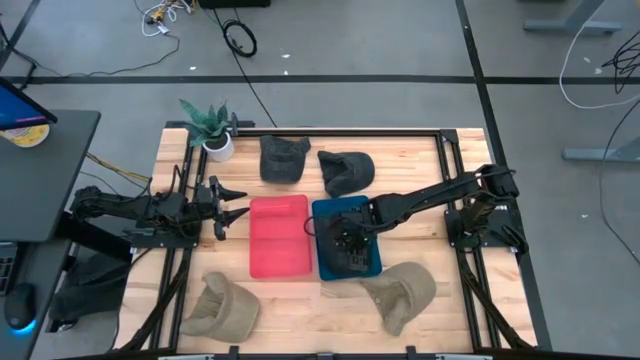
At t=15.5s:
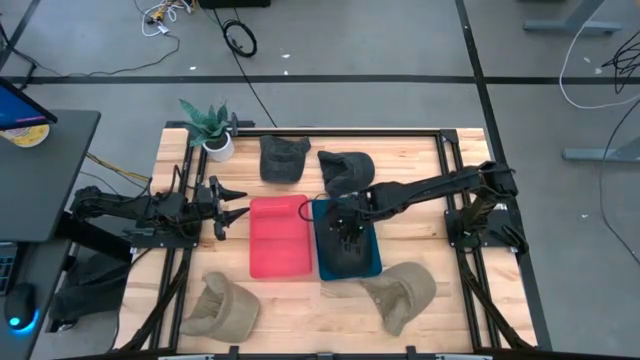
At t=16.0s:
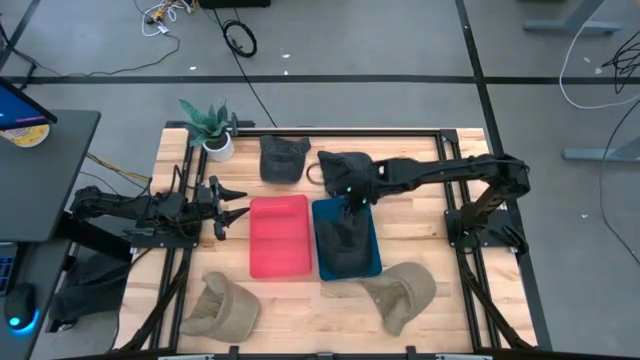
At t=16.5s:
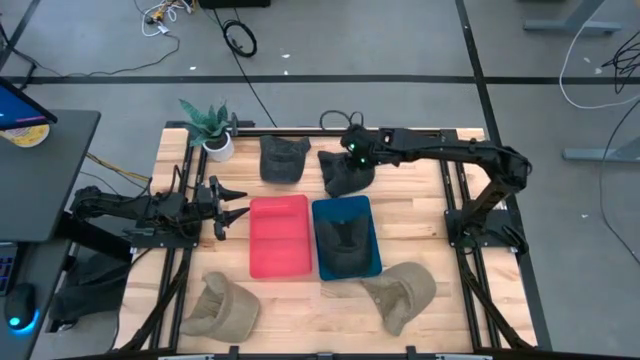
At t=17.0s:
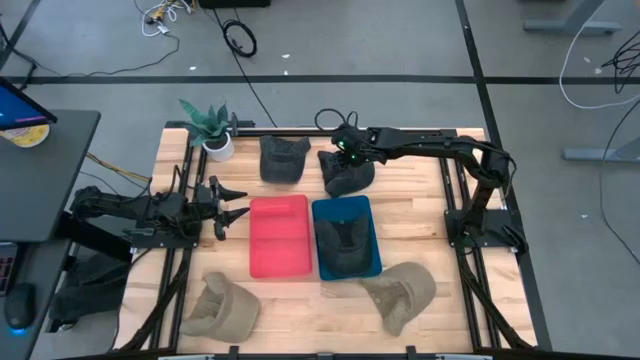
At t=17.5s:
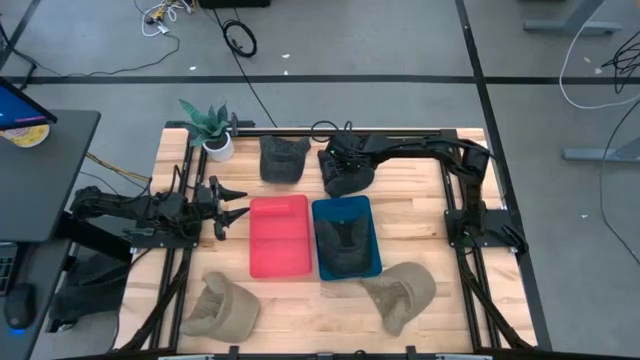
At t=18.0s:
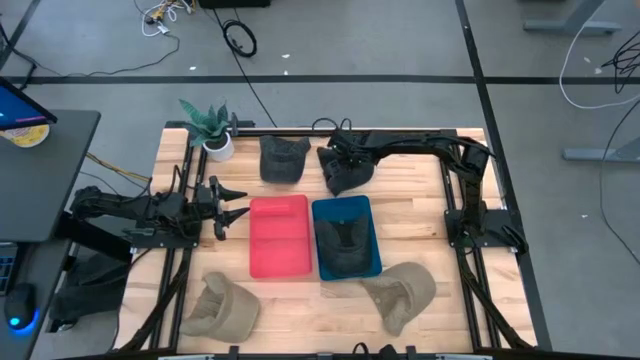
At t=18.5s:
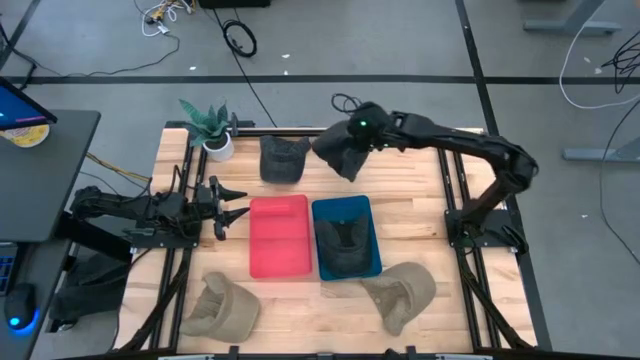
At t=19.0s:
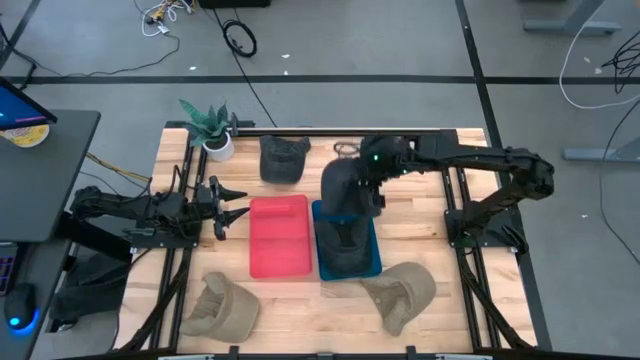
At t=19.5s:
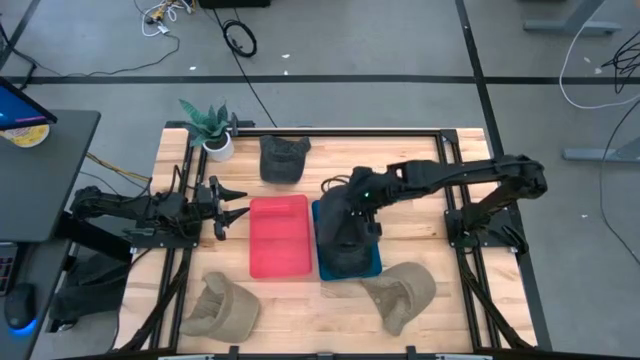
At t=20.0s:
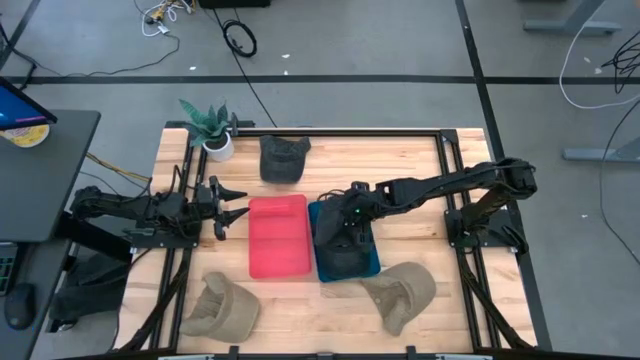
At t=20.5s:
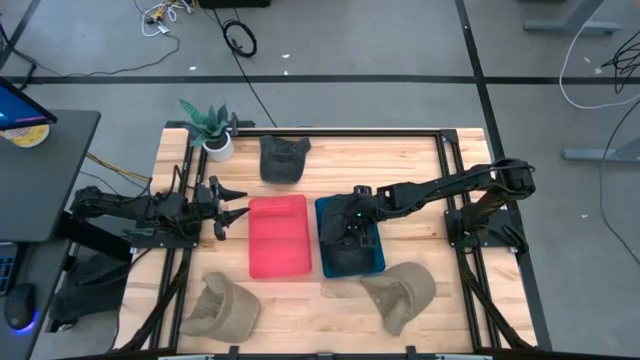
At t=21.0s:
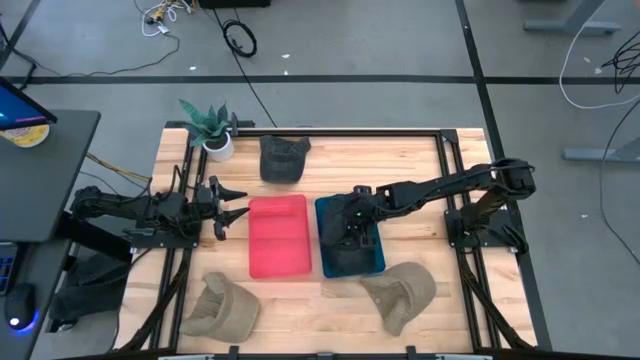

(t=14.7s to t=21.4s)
Task: Pick & Place hat
Put the black cap into the blue bin

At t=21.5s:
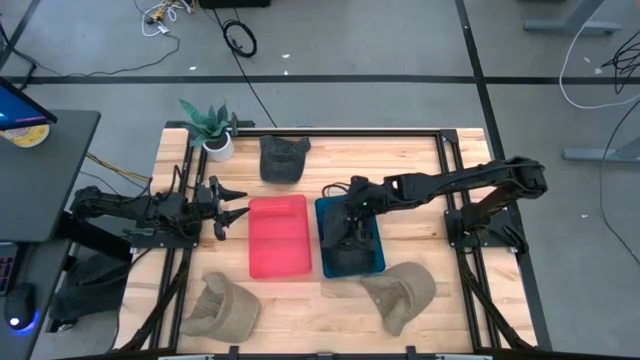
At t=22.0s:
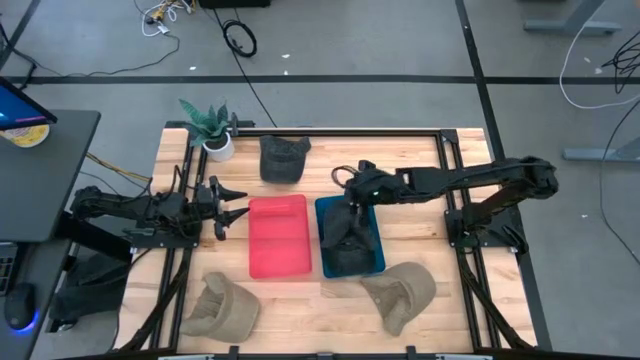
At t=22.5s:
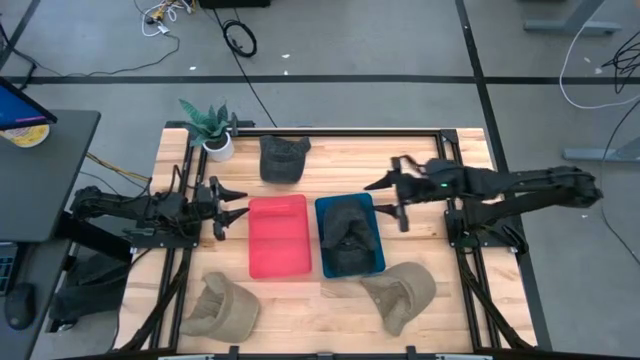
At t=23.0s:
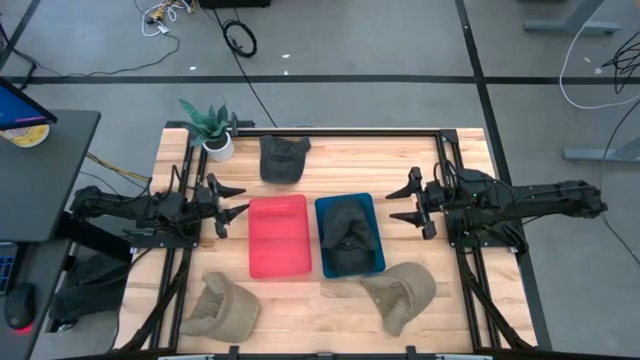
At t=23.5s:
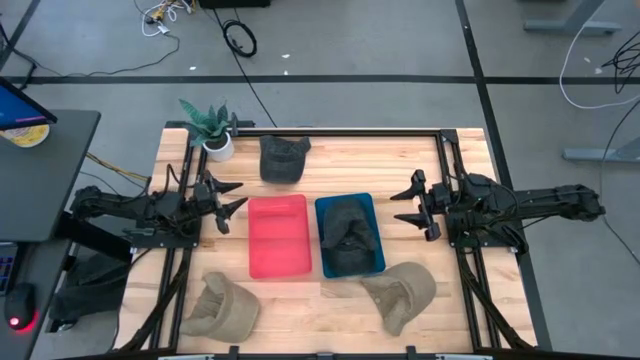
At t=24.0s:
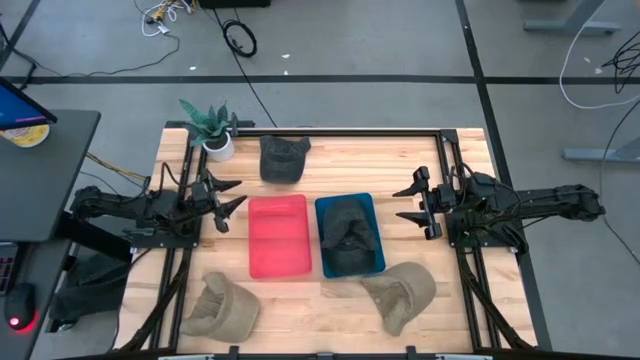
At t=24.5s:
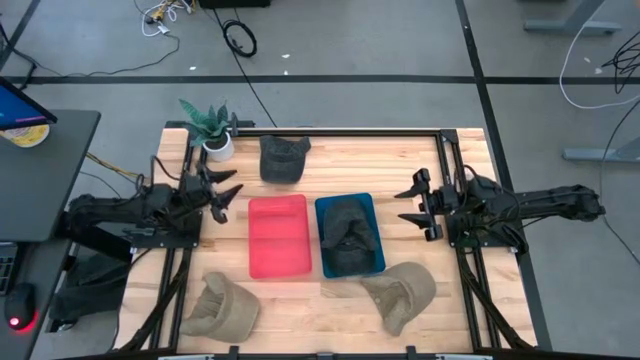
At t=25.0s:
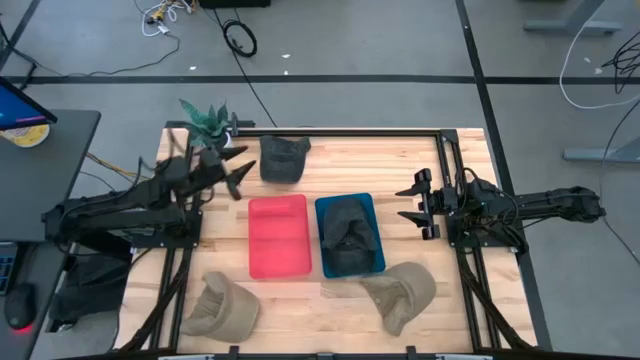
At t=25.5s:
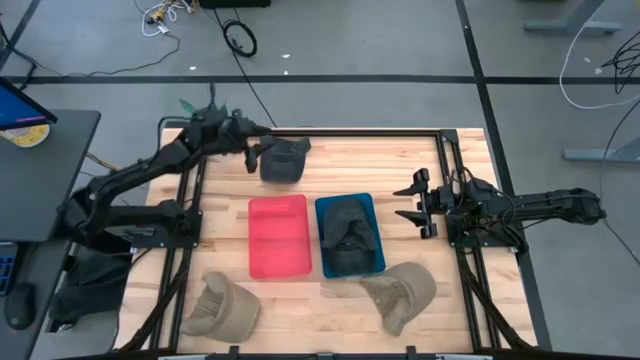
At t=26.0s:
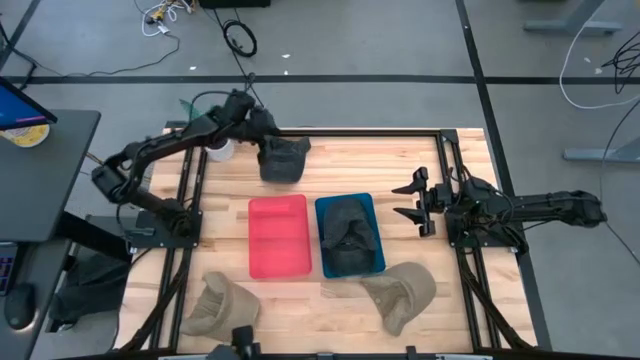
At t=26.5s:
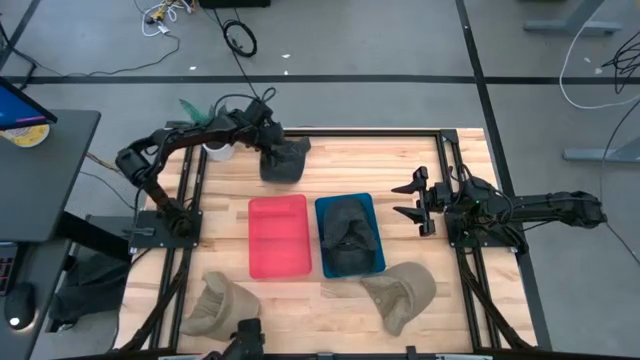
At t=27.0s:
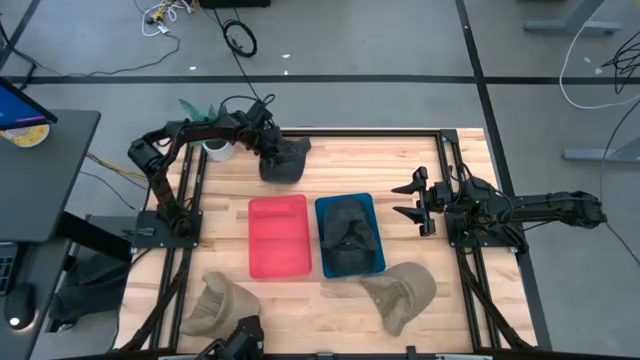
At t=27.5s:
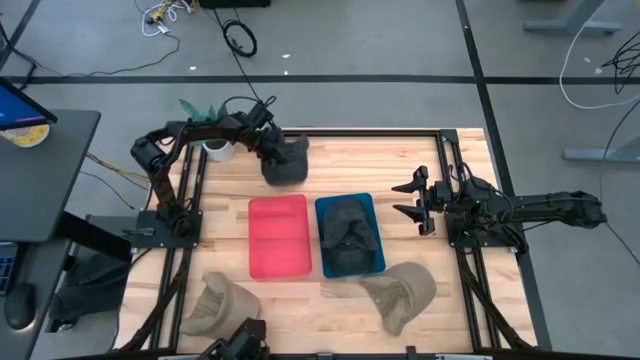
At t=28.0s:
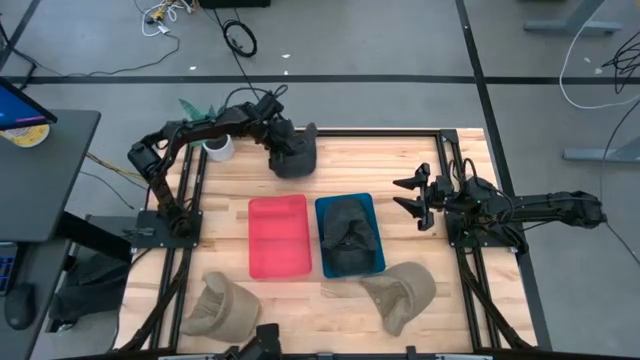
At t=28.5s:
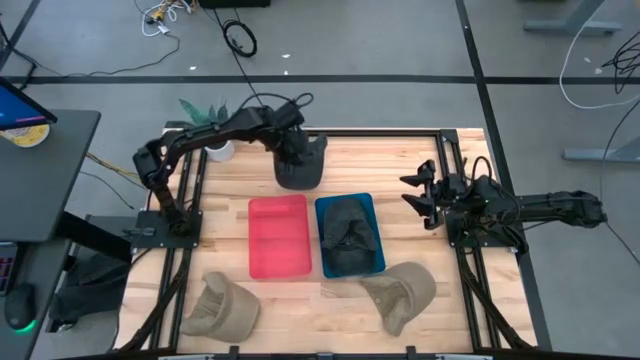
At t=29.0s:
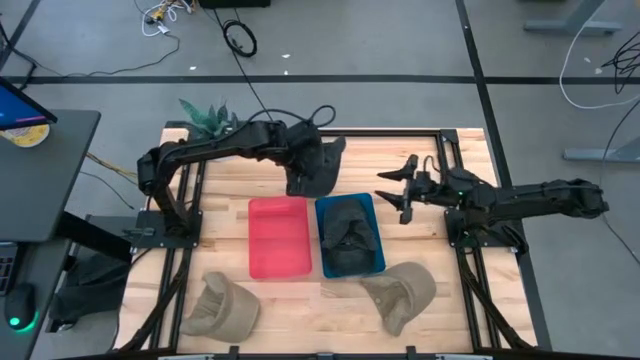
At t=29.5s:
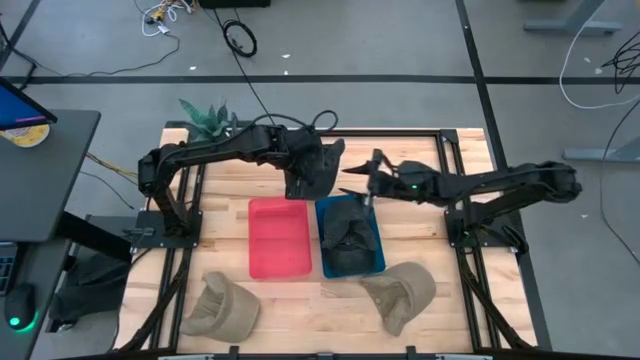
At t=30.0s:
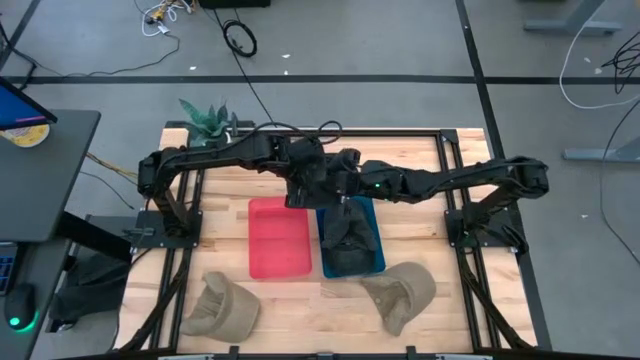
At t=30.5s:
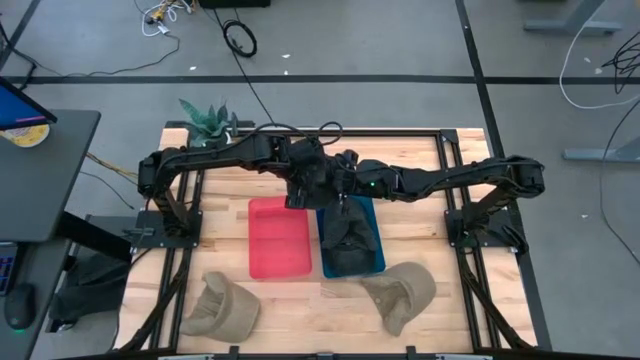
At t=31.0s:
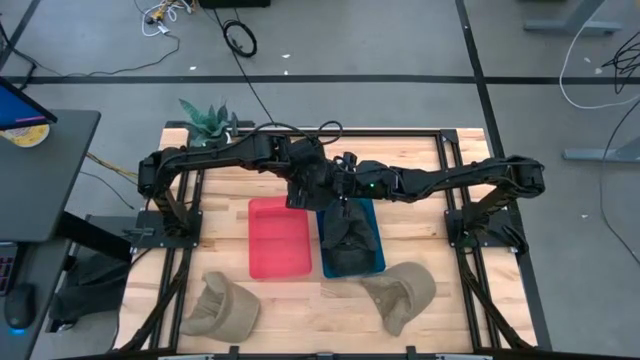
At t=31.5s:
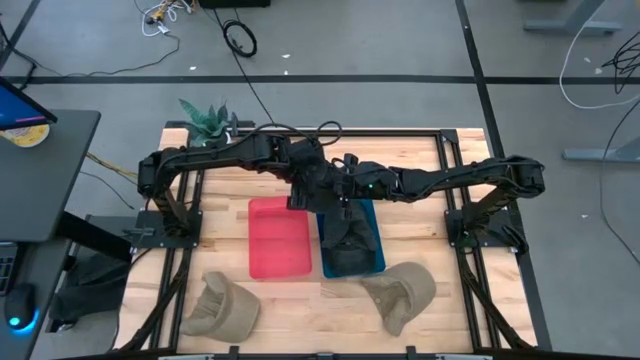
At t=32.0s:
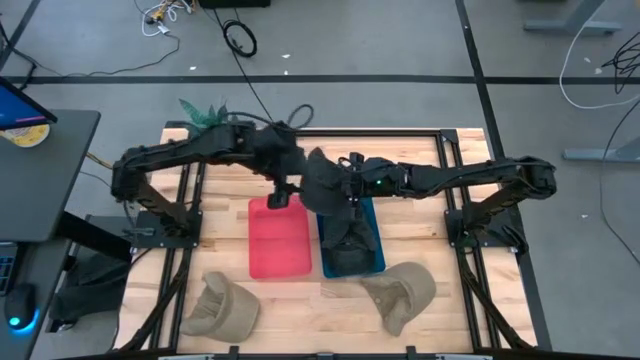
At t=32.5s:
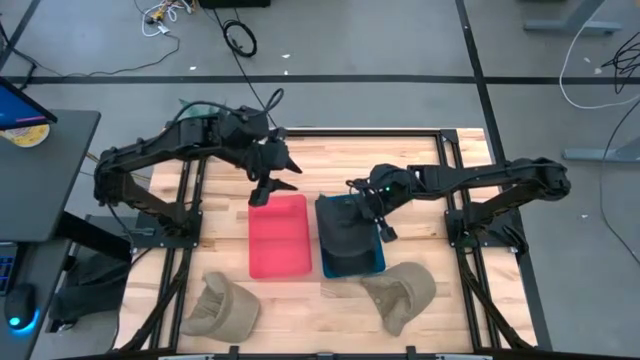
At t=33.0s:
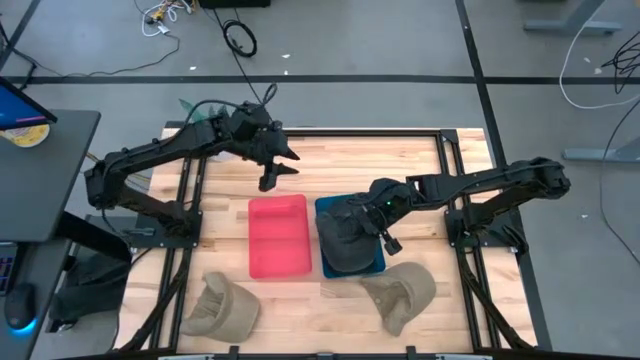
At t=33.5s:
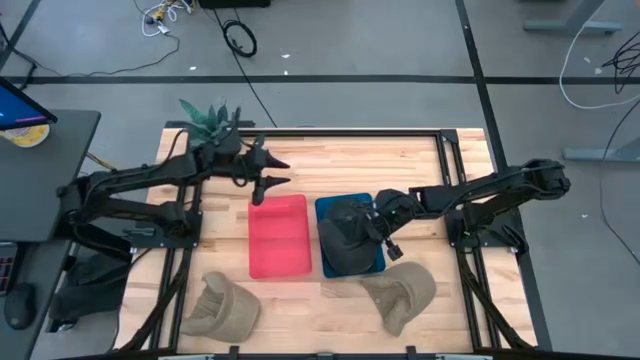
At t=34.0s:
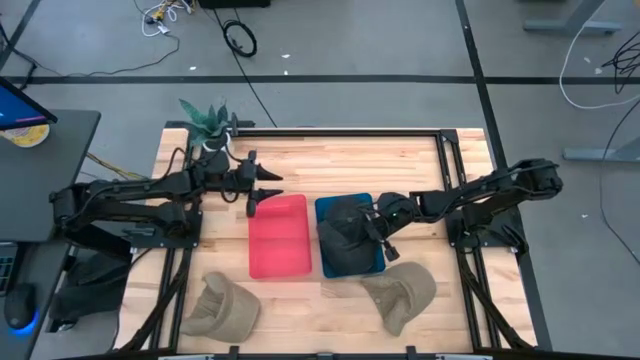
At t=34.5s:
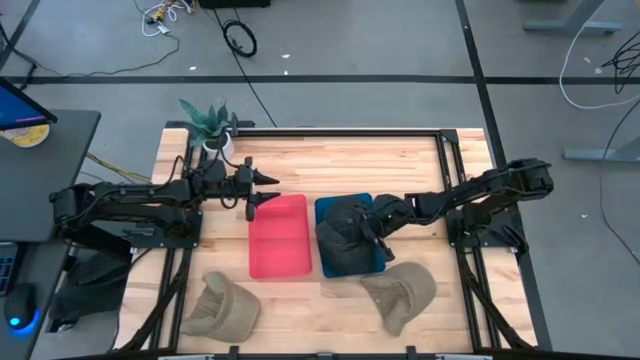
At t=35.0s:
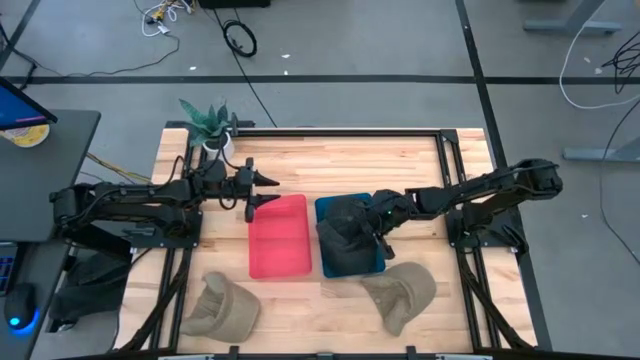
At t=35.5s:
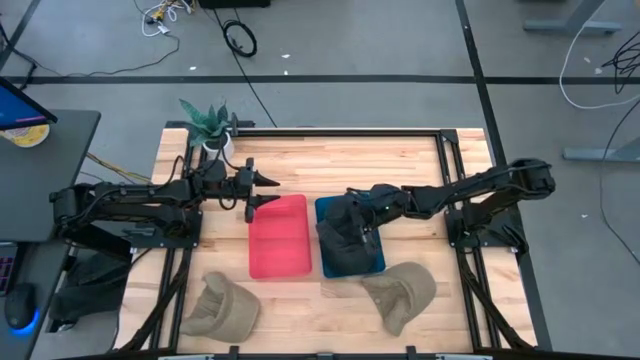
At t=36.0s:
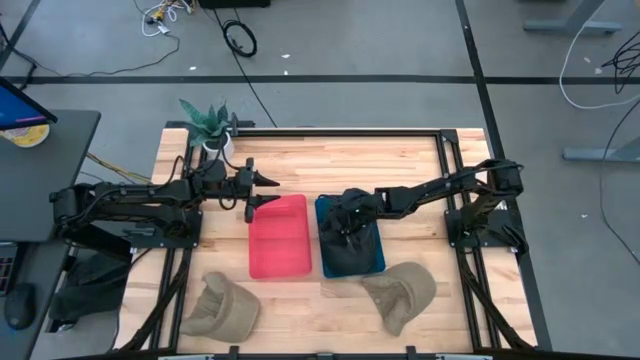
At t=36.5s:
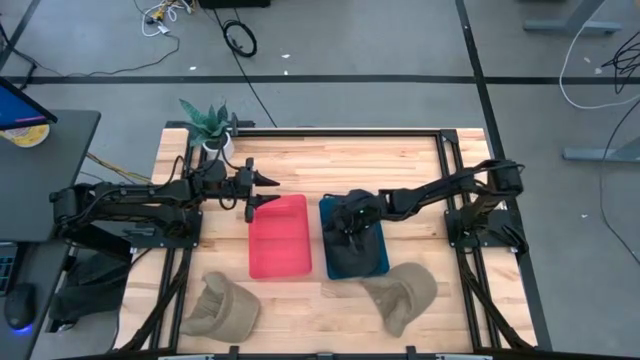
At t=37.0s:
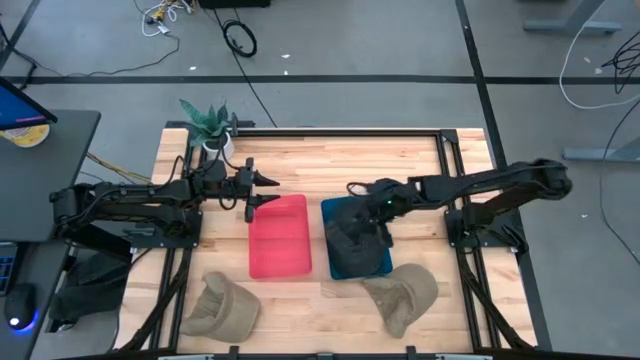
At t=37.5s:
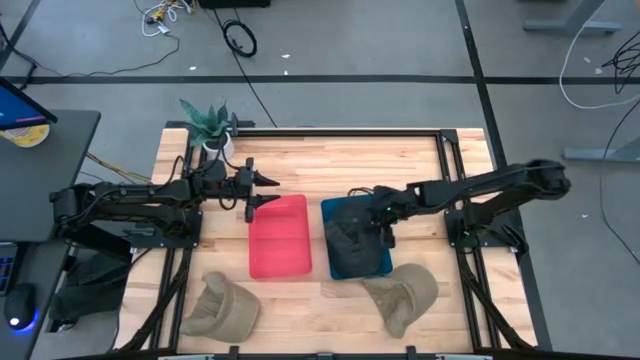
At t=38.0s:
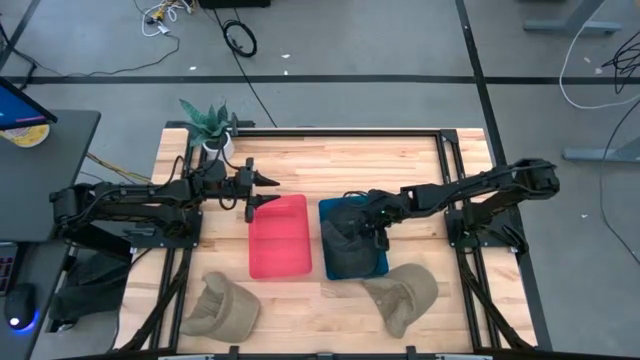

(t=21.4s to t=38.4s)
Put the black cap into the blue bin
